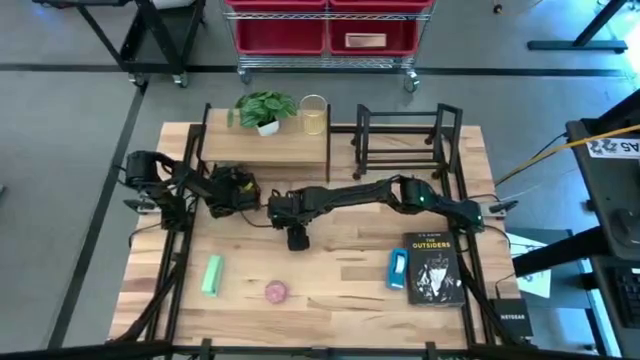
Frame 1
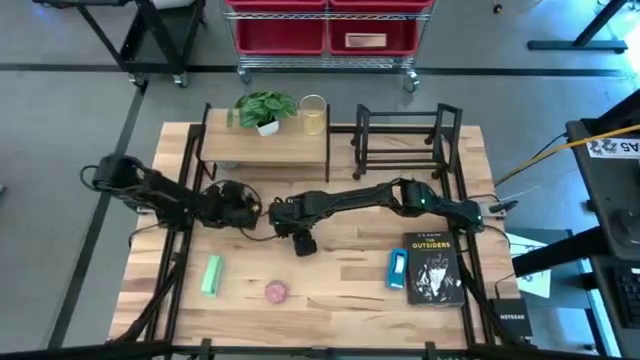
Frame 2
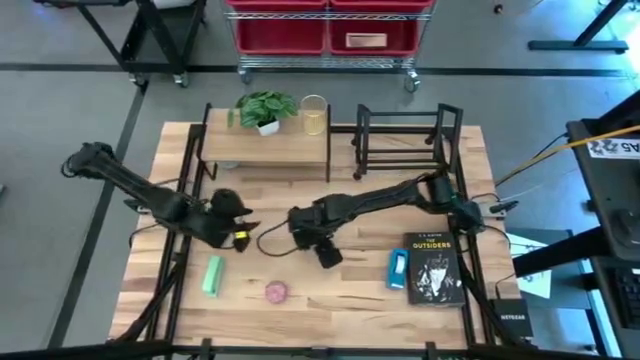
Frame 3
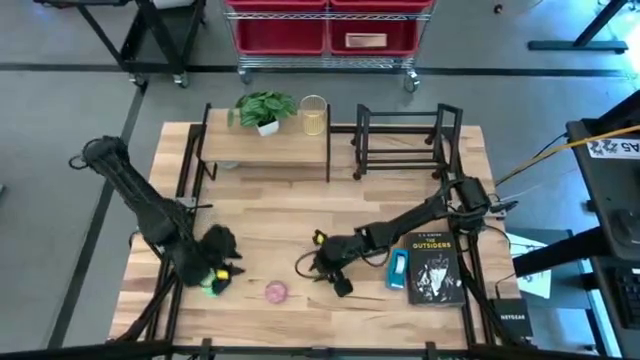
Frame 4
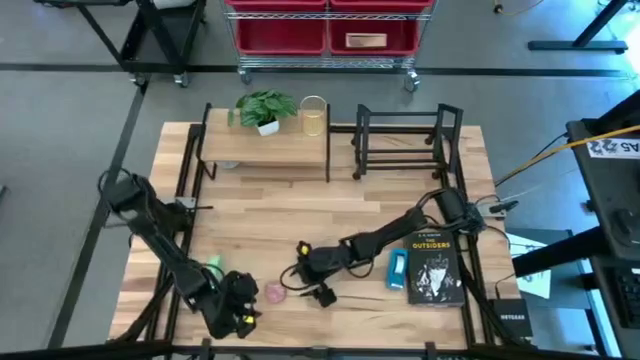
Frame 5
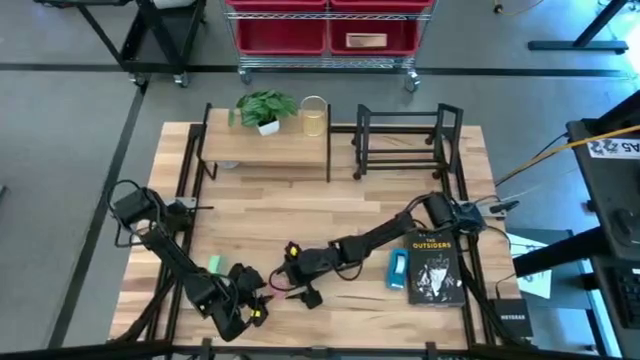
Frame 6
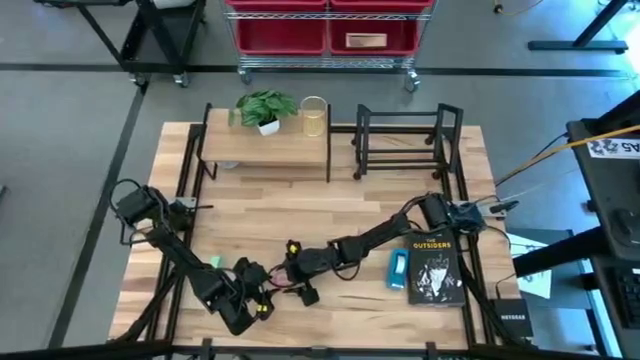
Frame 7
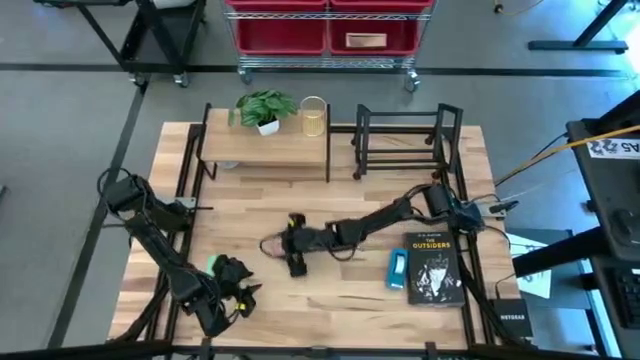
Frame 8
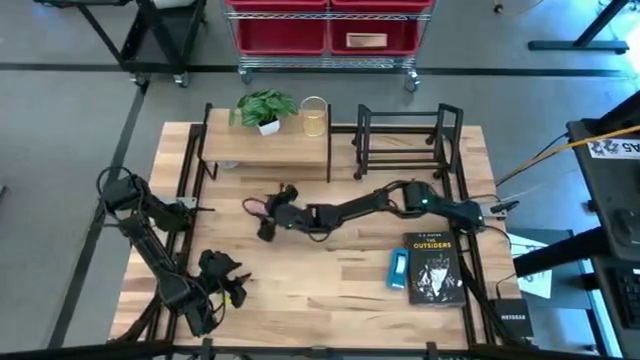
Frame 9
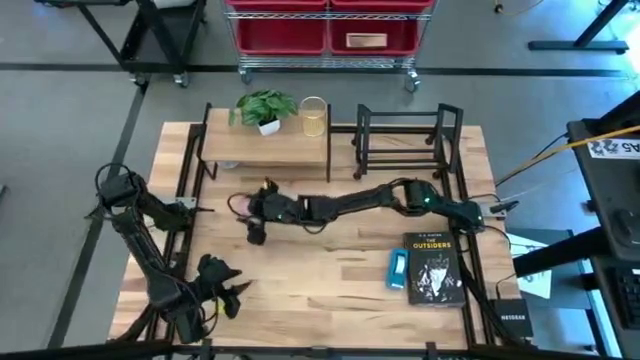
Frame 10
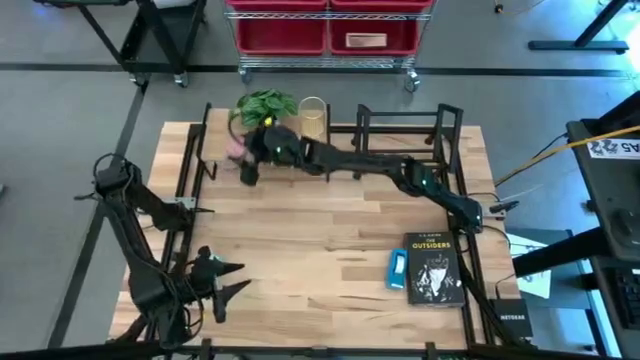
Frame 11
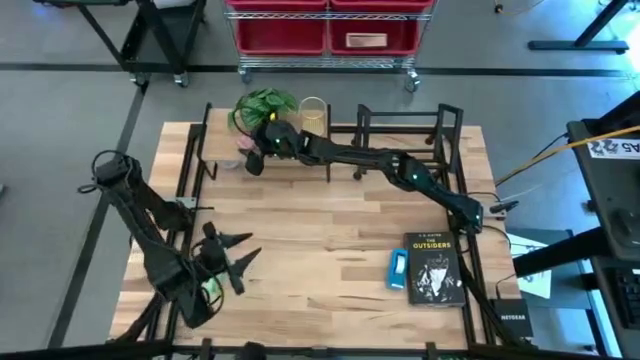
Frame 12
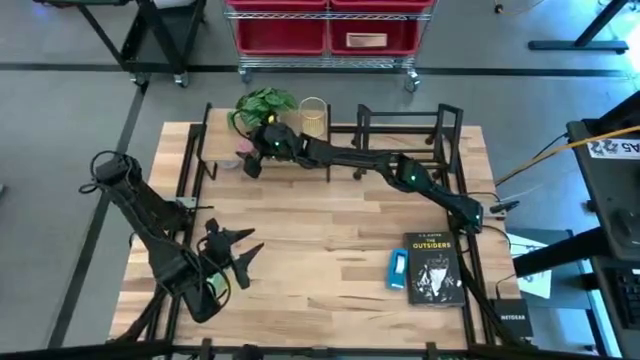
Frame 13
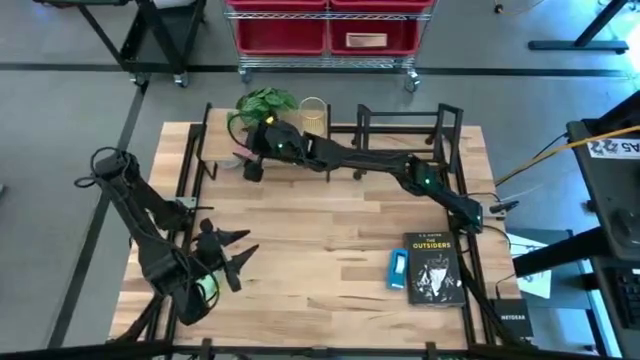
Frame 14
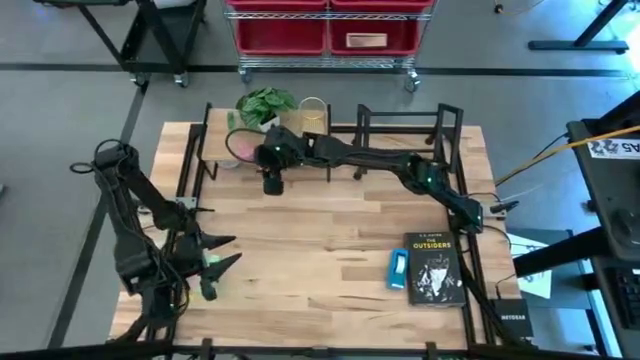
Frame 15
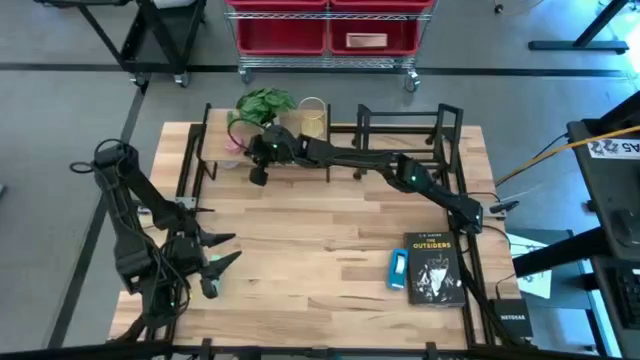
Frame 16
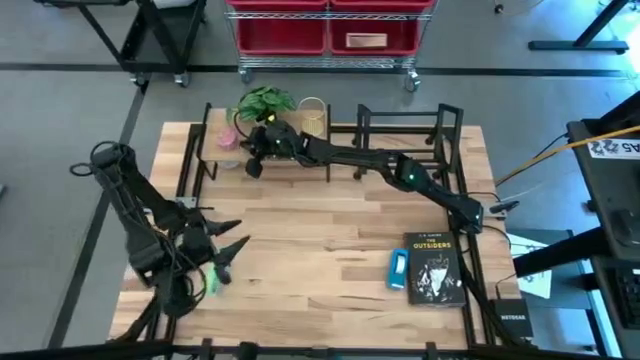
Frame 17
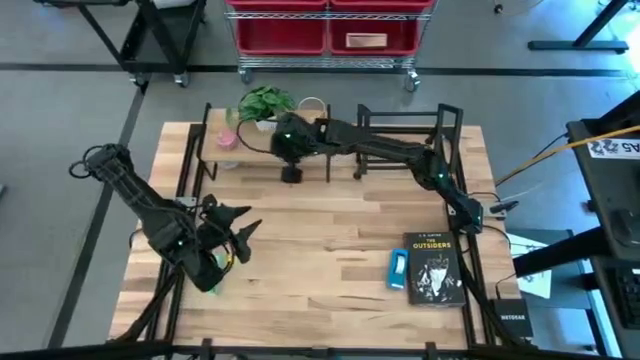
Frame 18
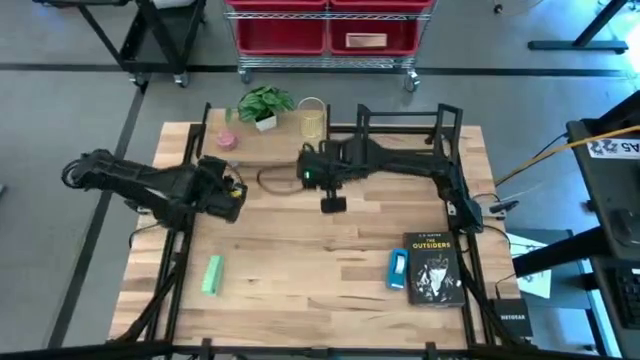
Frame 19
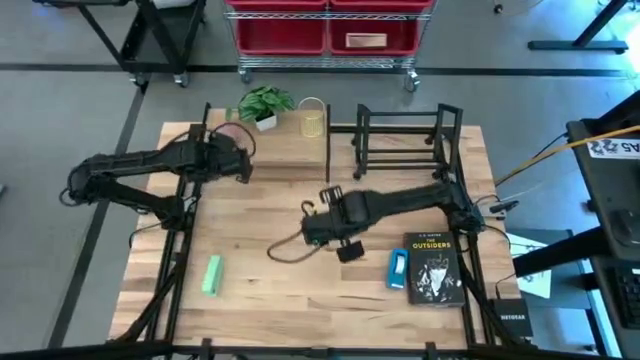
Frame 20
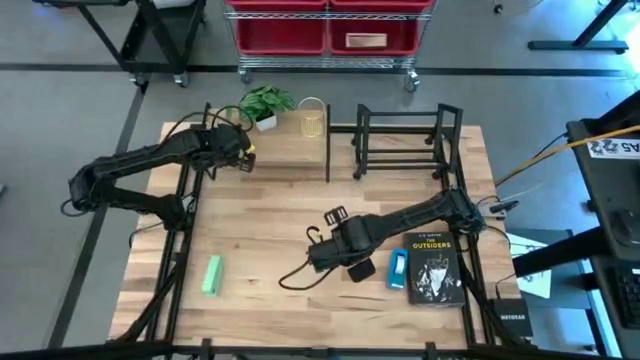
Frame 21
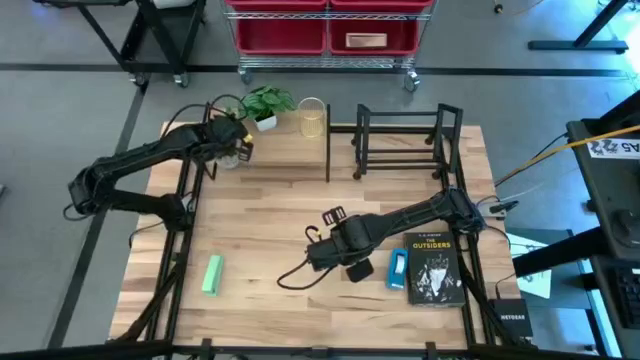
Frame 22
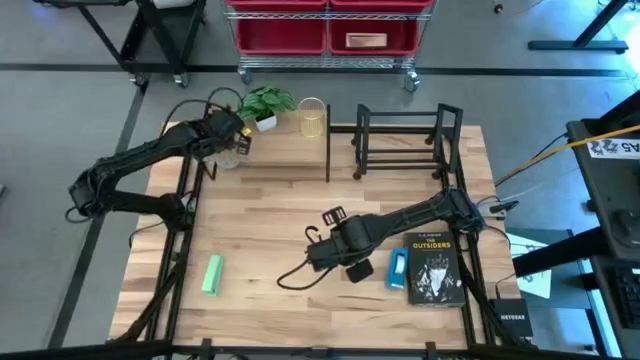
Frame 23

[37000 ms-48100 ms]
Task: Stock shelves
Put the red scented candle on the shelf

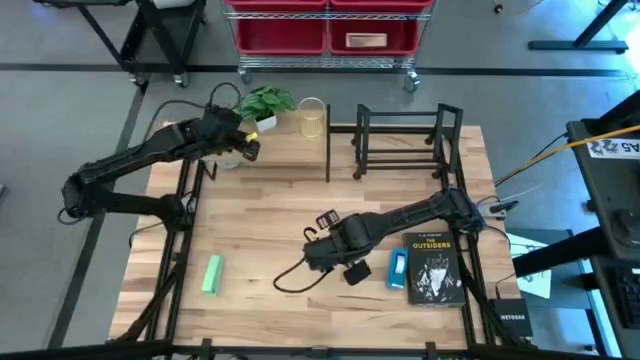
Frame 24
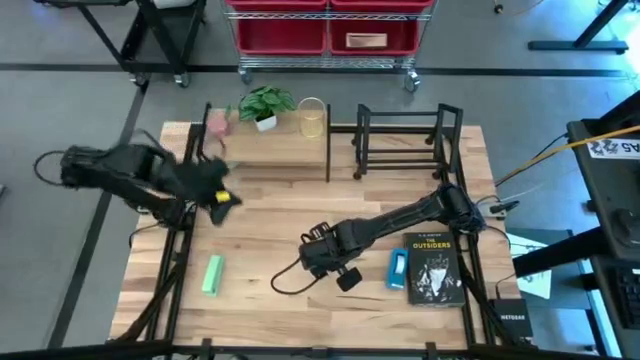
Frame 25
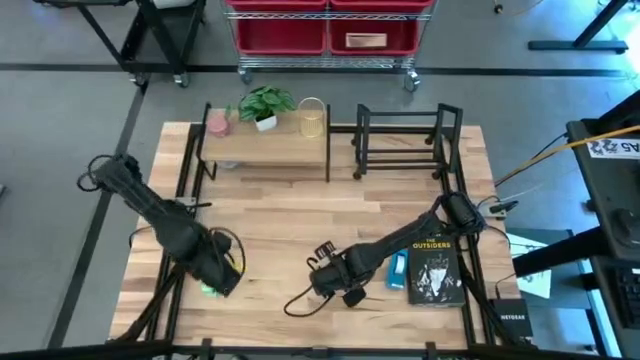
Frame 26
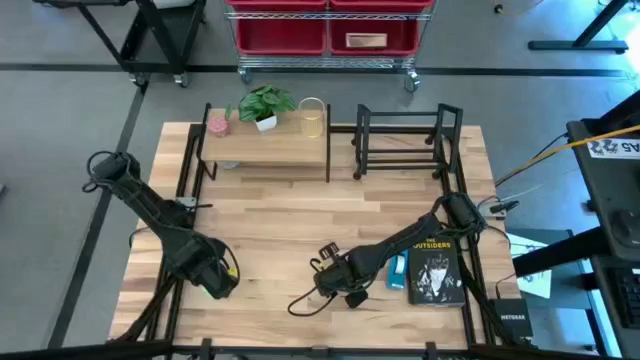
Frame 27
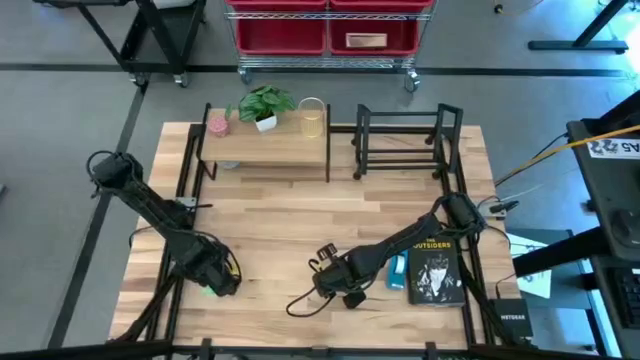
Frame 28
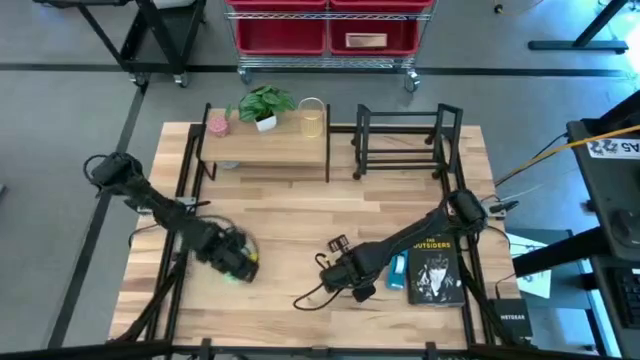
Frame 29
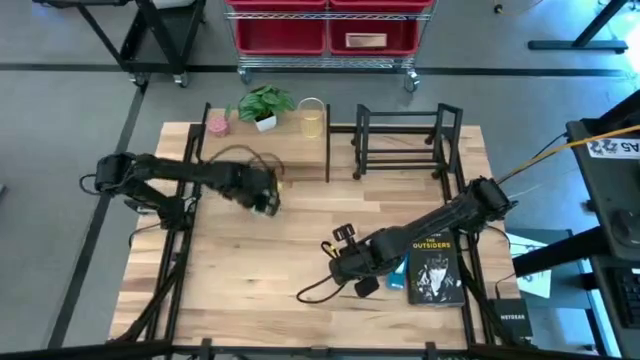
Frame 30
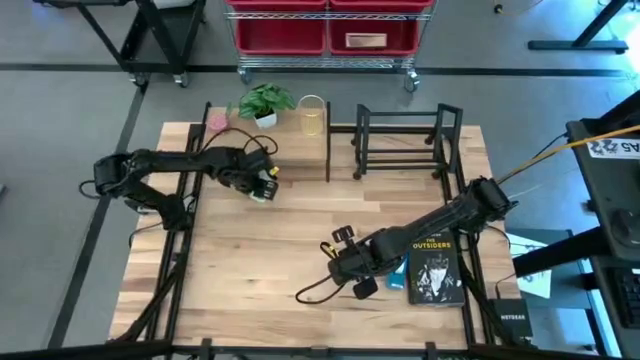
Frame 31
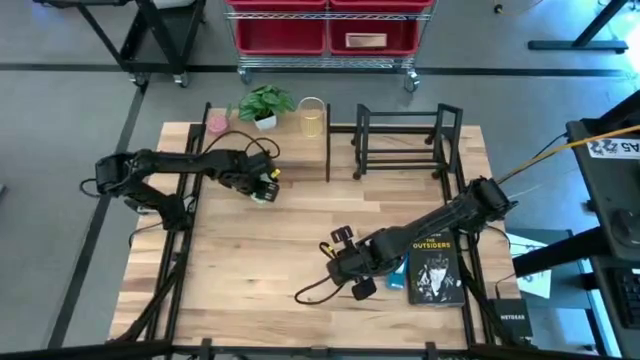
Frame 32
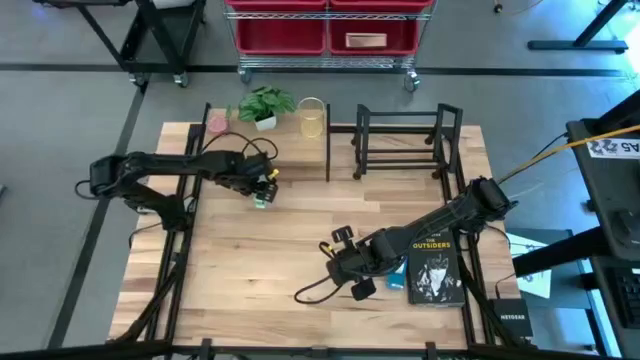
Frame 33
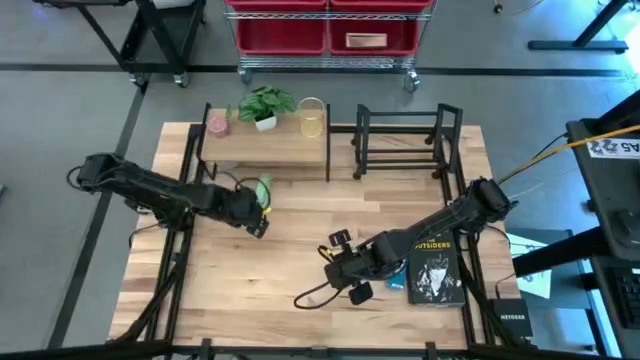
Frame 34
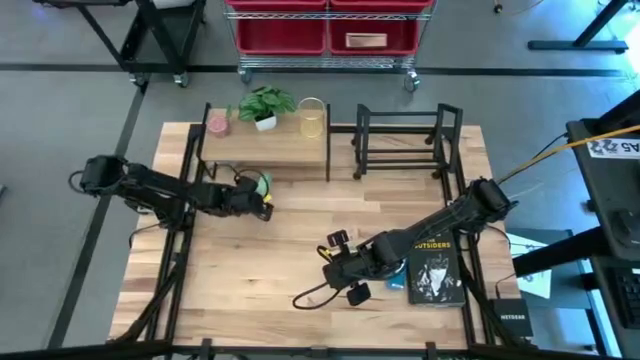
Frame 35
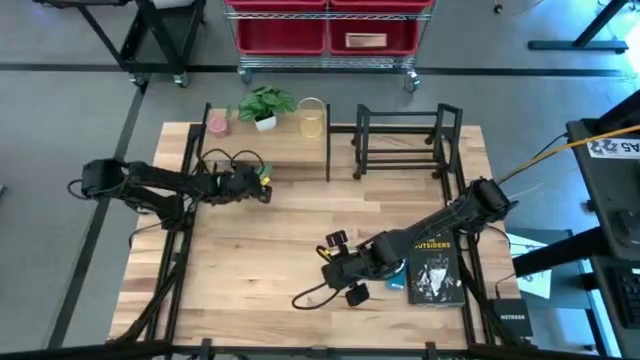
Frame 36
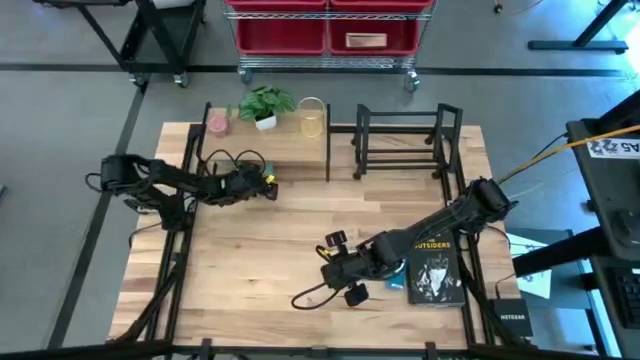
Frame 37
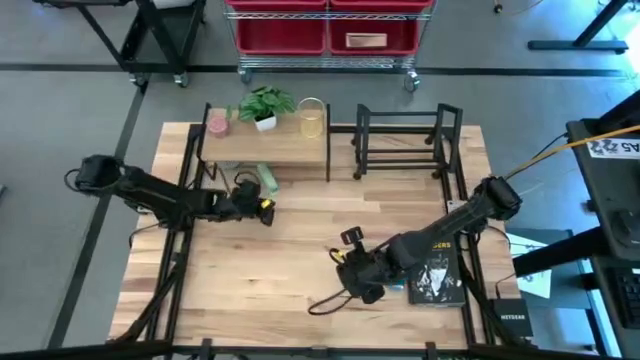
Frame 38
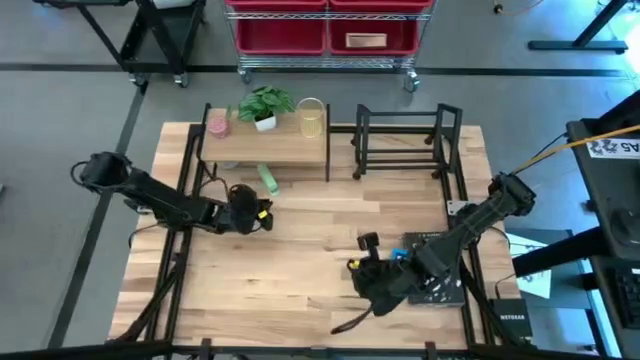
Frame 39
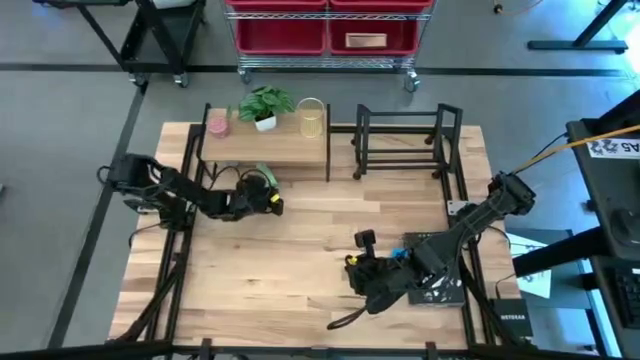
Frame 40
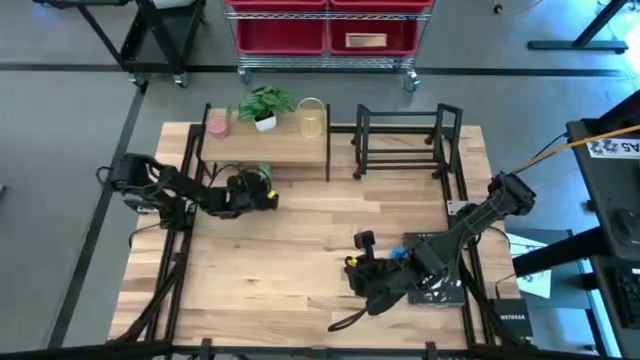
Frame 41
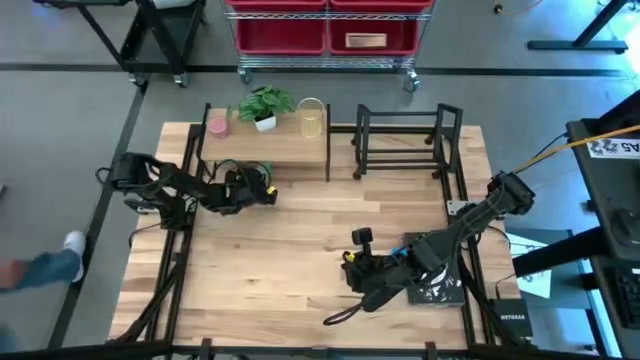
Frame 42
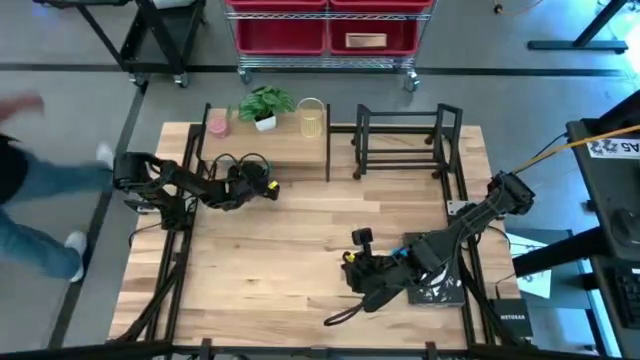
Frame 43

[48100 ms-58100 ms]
Put the green stapler under the shelf

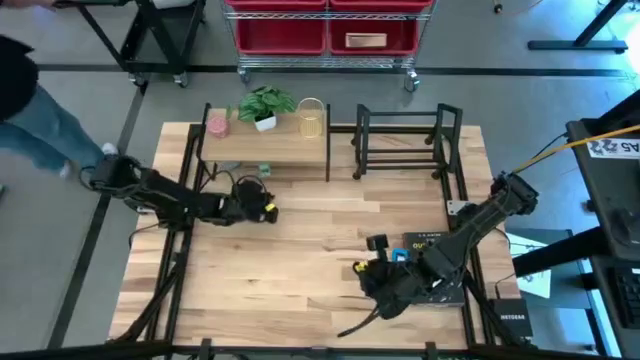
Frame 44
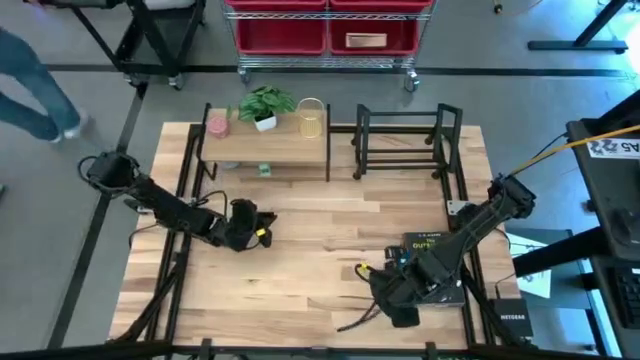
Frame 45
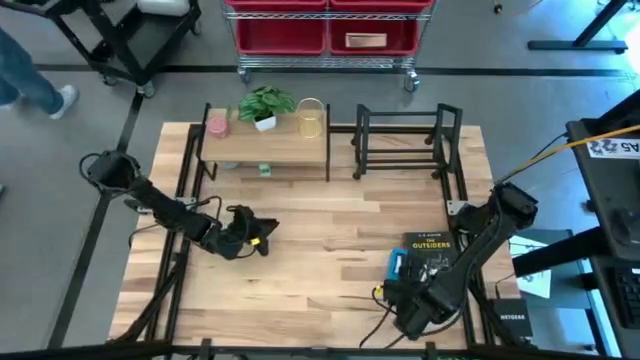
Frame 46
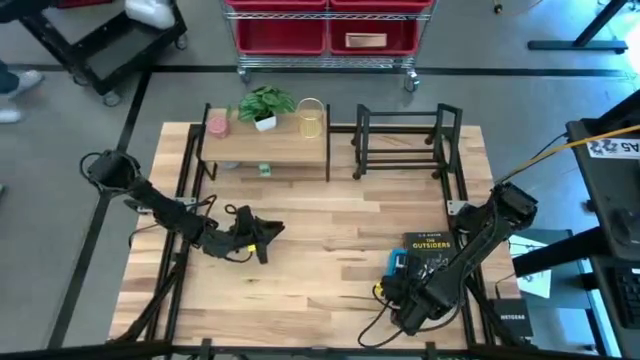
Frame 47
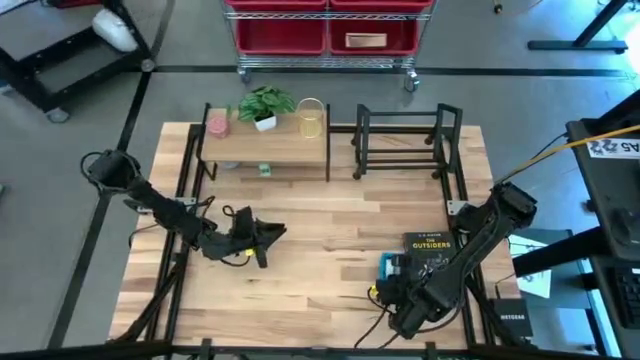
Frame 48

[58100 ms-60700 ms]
Put the blue tape dispenser under the shelf
